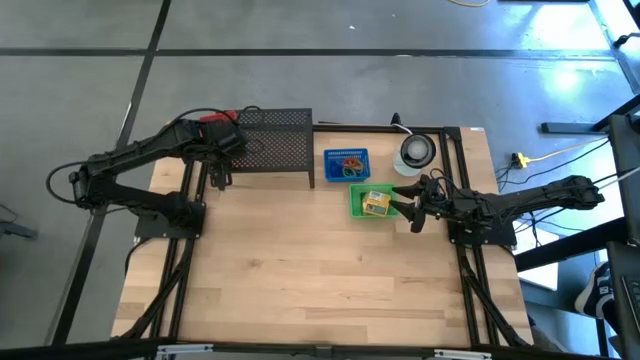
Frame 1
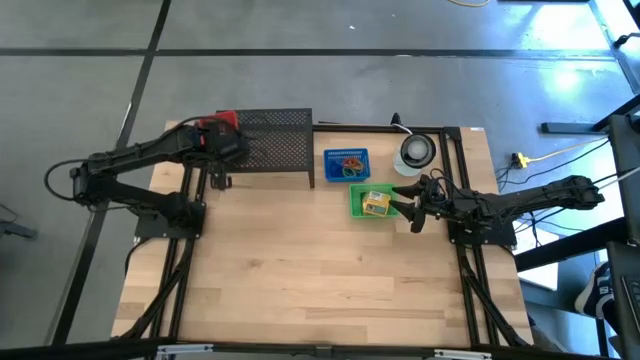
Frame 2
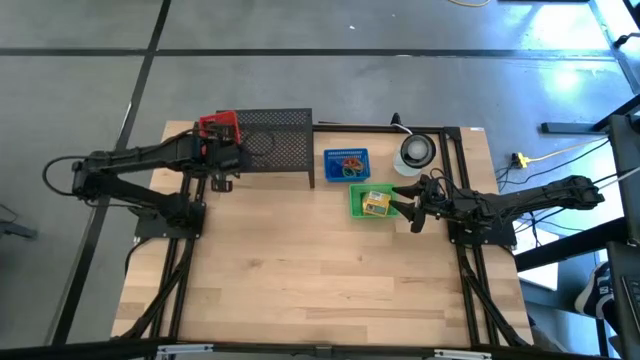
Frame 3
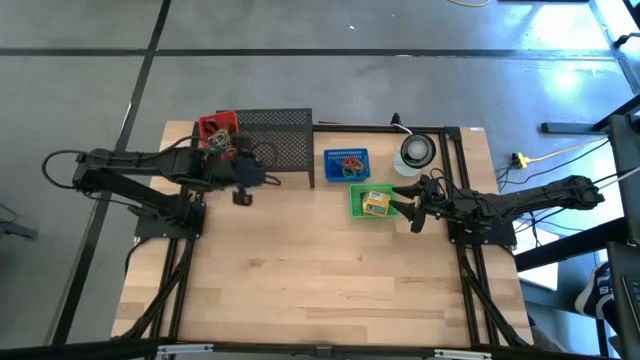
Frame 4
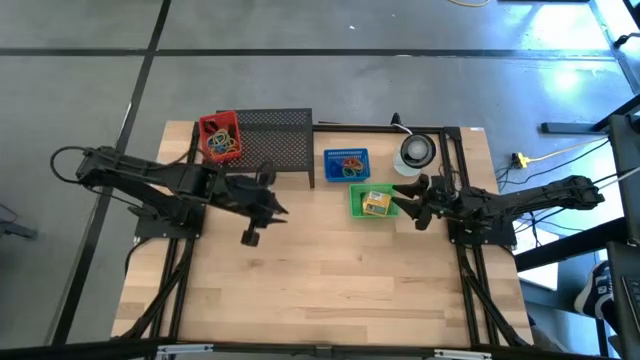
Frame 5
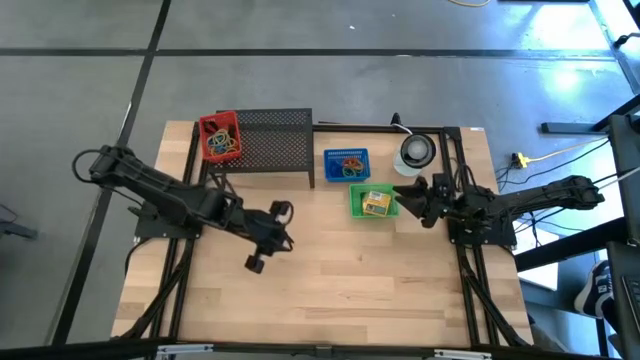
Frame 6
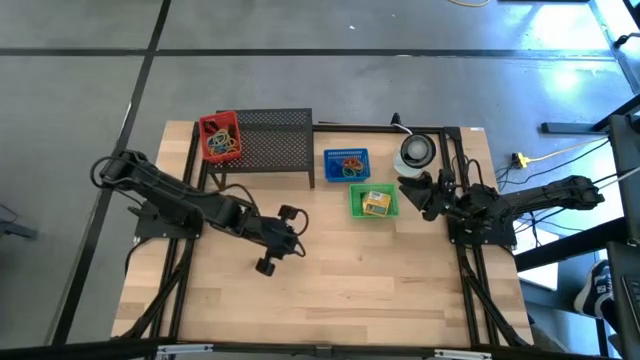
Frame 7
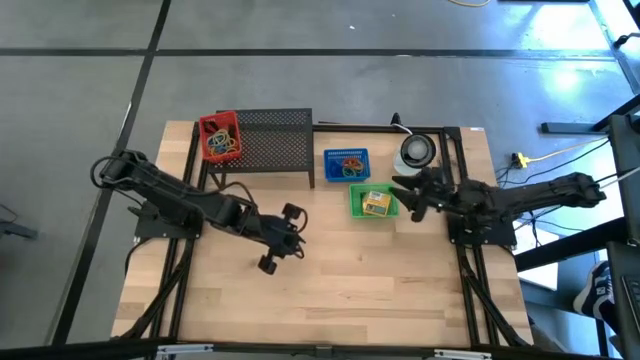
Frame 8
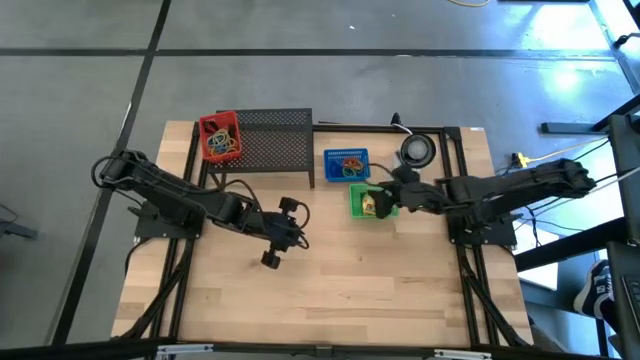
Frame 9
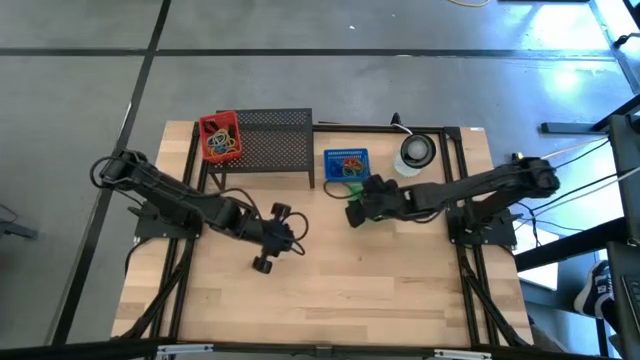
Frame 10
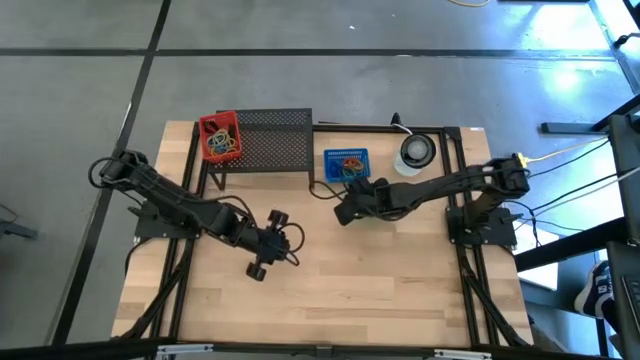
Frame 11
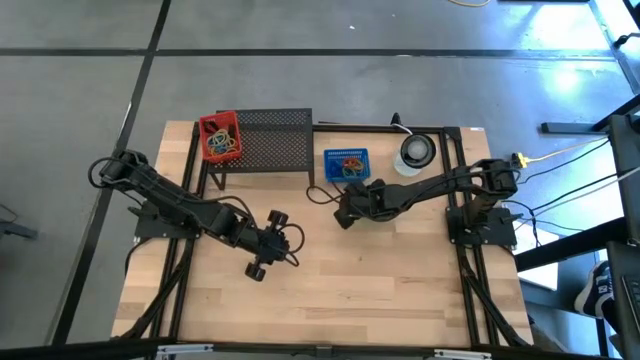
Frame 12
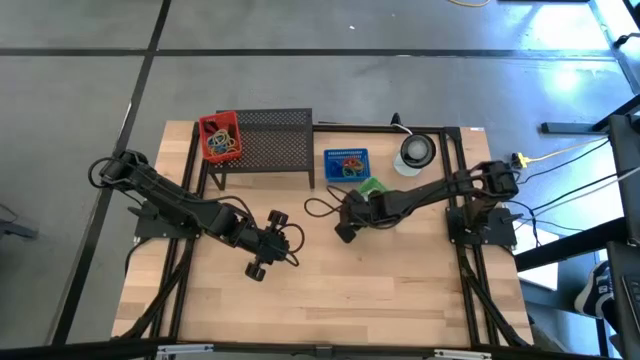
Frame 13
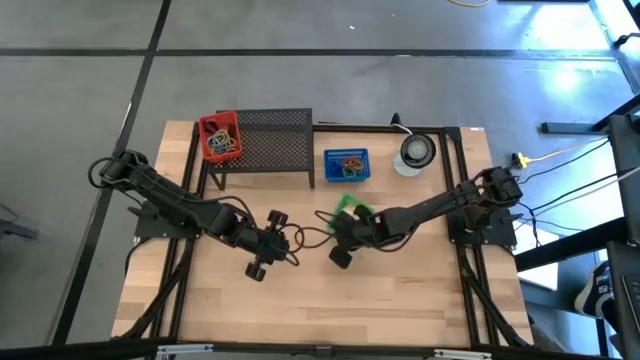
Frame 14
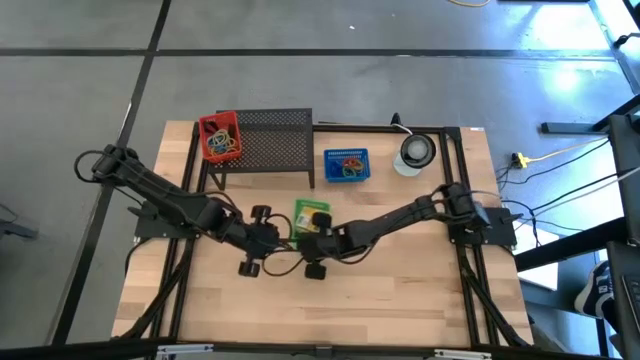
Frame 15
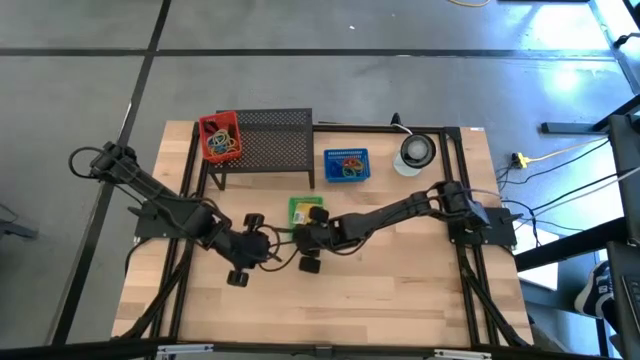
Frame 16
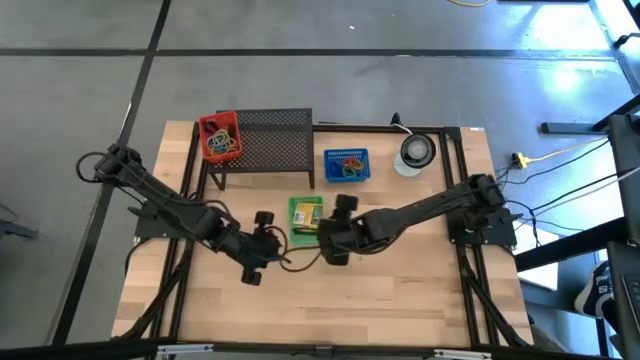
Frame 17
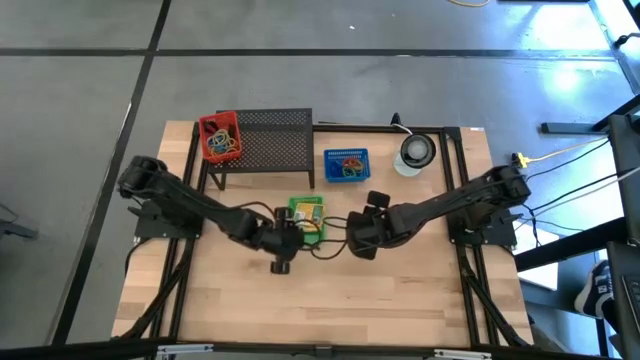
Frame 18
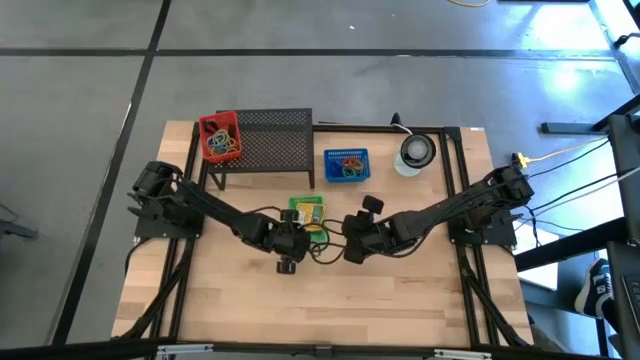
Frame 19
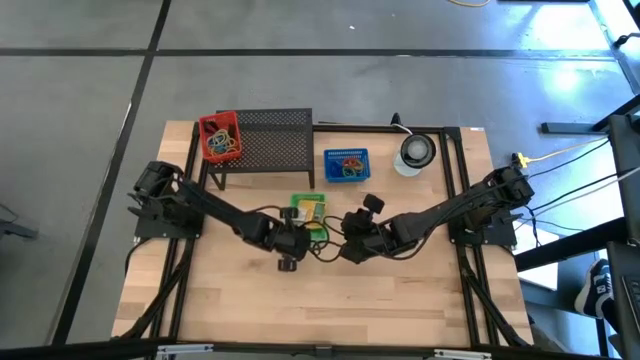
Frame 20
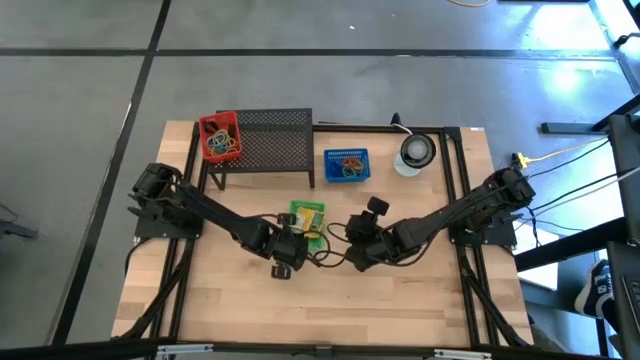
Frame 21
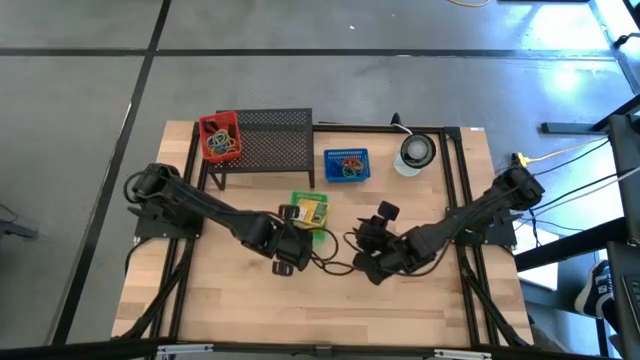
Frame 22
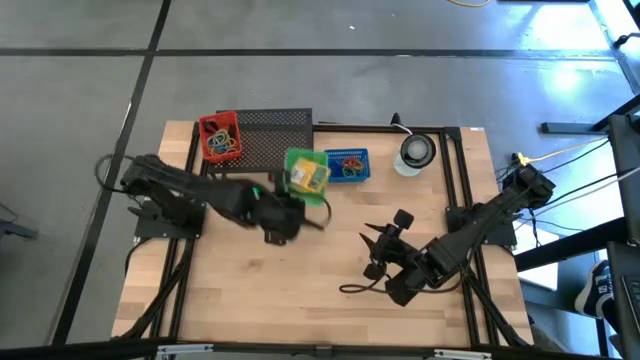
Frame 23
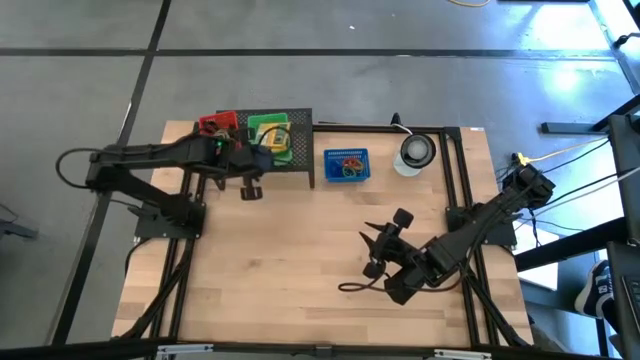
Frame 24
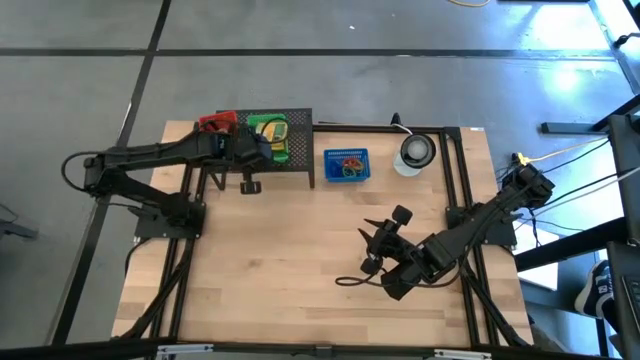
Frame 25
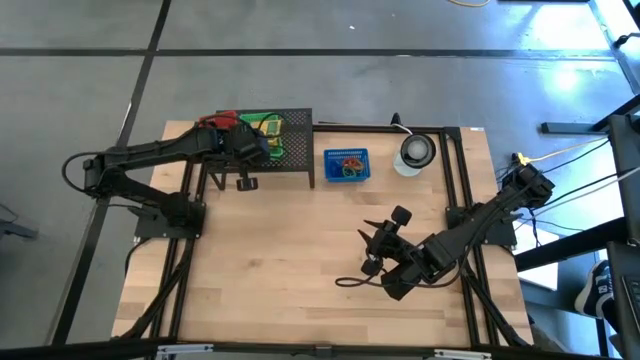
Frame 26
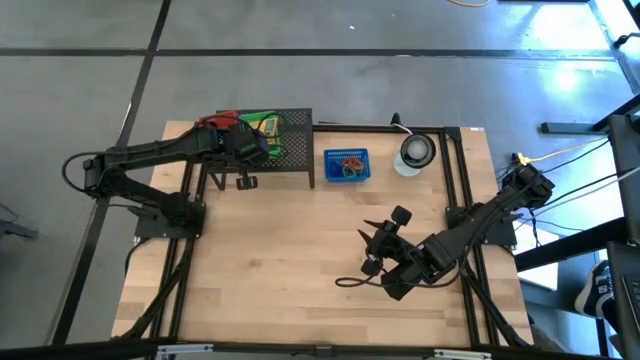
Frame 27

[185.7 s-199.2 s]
Task: Pick & Place Office Desk Supplies
Put the green basket on the shelf

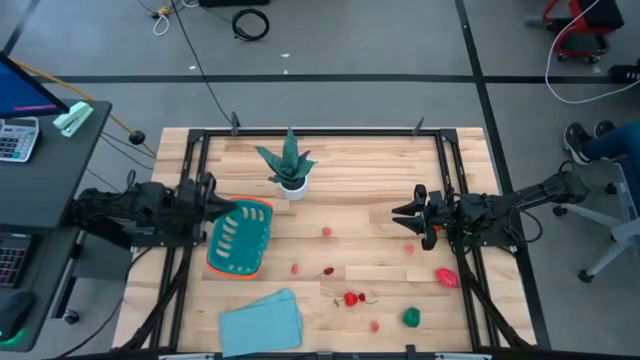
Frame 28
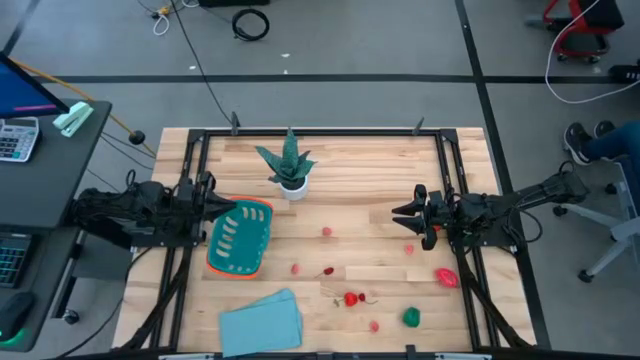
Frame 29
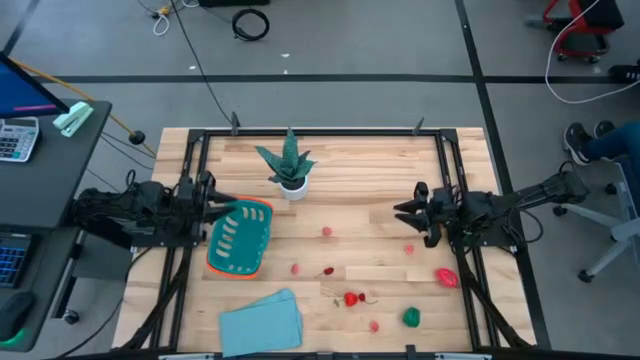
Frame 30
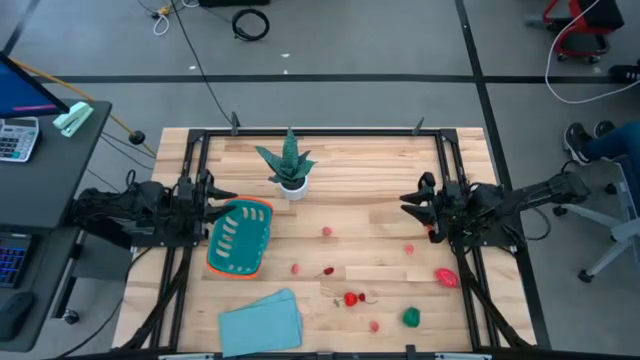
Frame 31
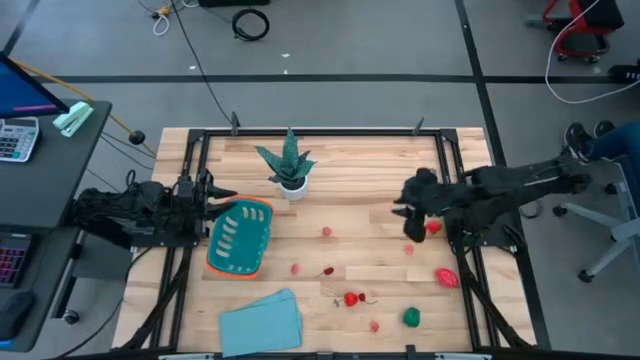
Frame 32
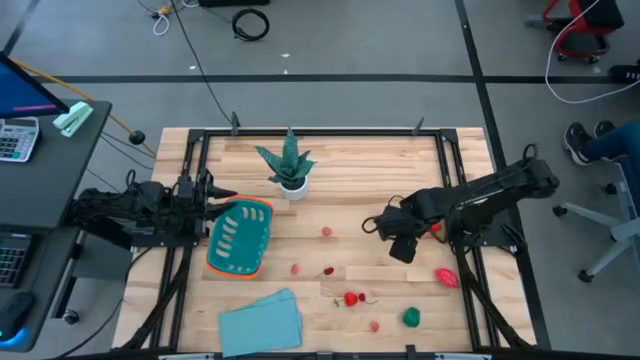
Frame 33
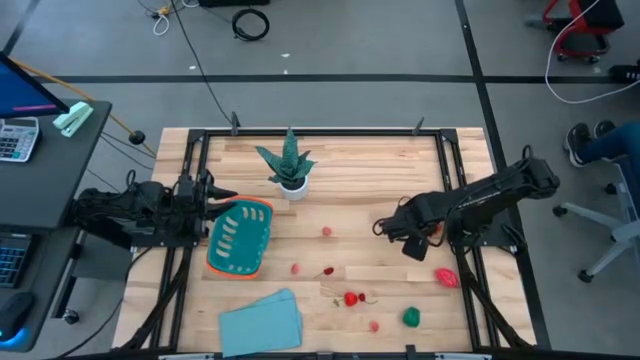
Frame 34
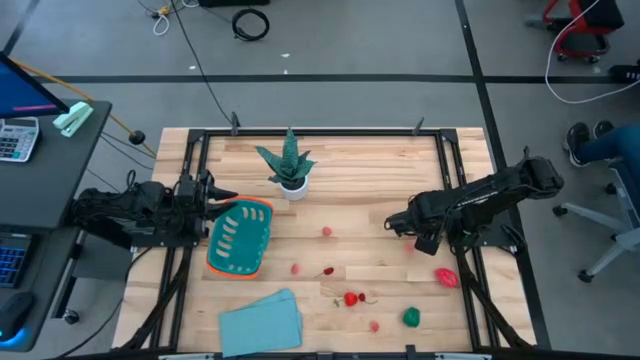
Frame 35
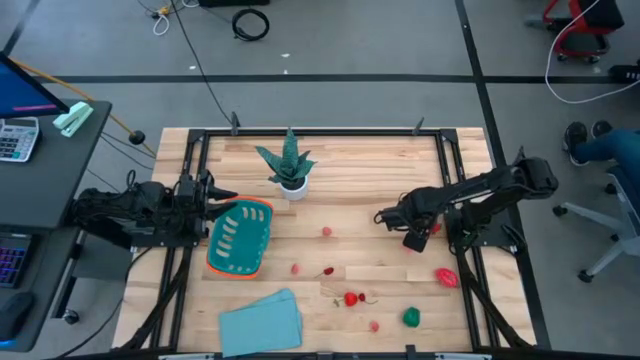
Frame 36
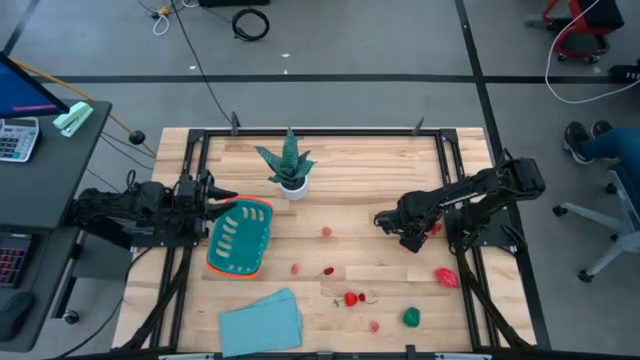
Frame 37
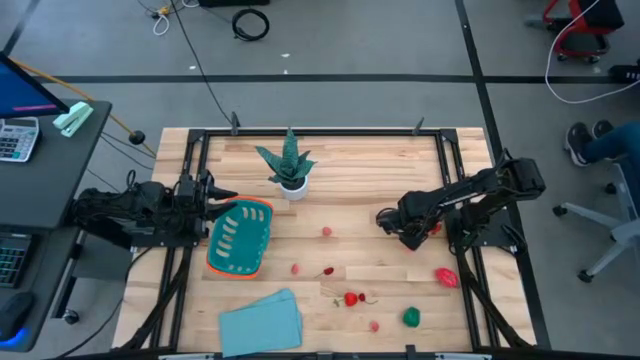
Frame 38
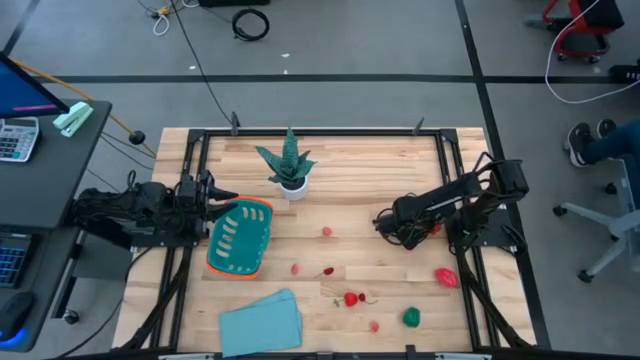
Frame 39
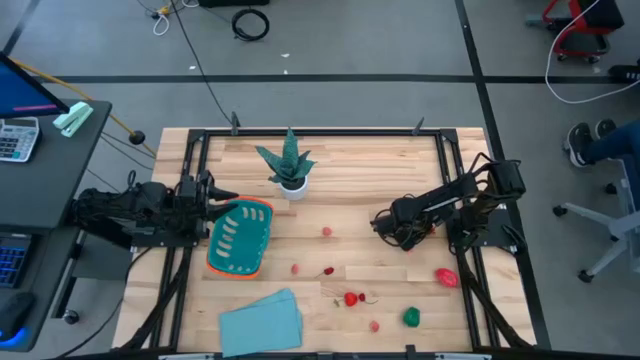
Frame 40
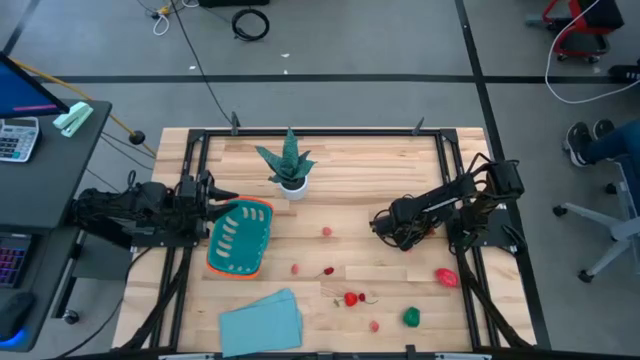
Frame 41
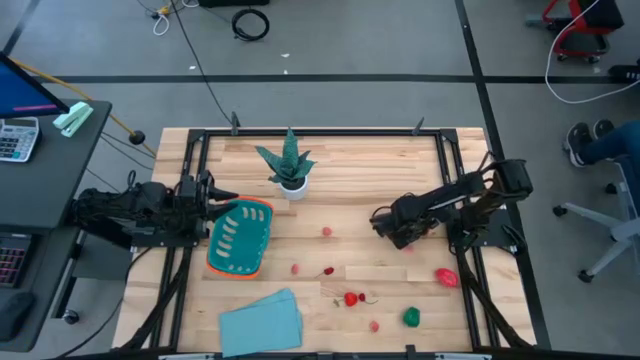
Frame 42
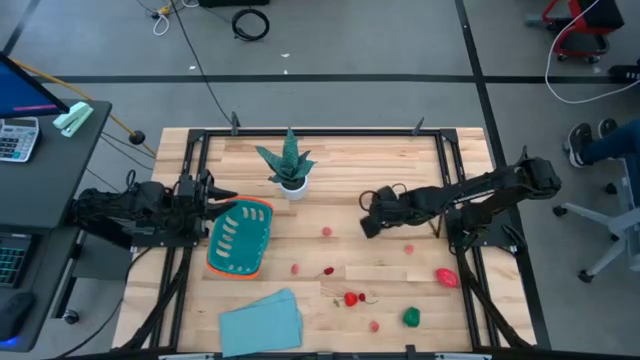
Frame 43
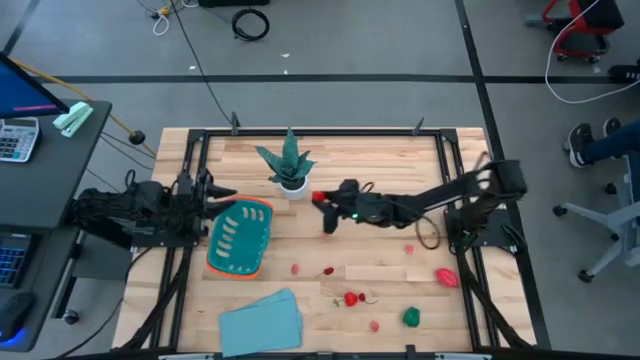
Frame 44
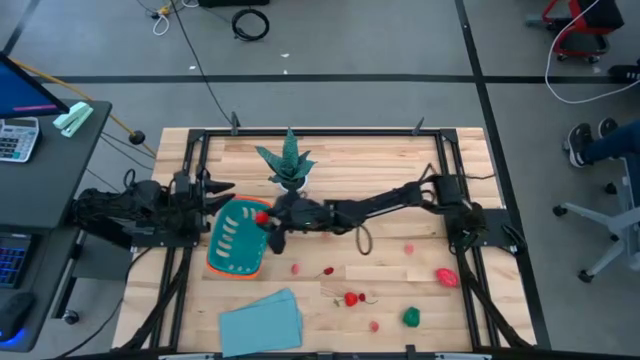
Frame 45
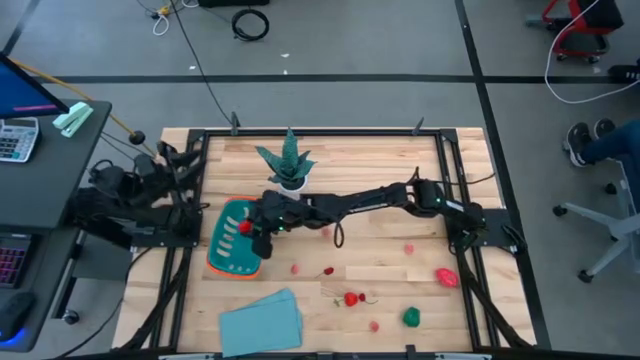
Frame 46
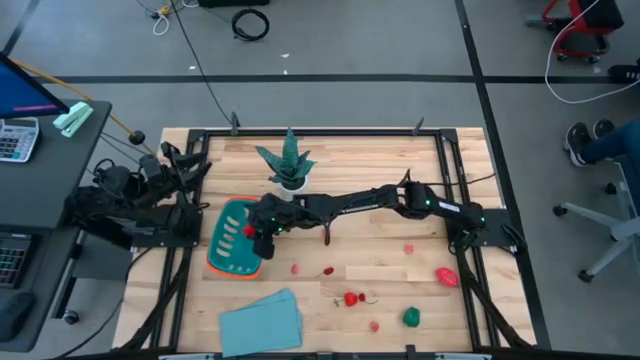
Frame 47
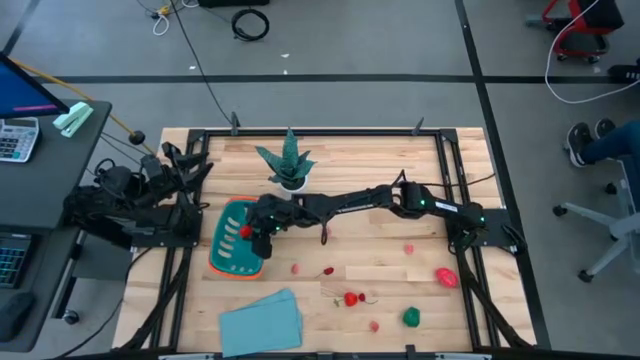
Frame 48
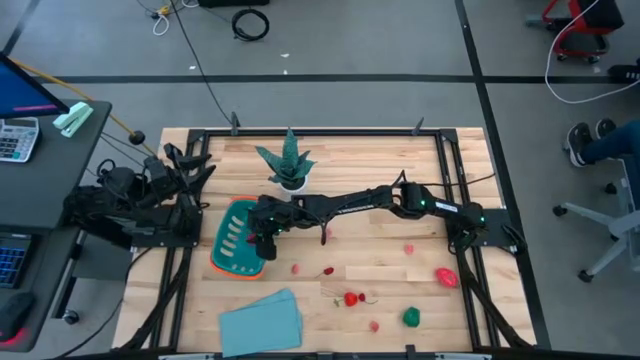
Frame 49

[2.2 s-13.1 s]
Task: Pick and placing Produce into tupperware
Put the red strawberry into the blue basket
